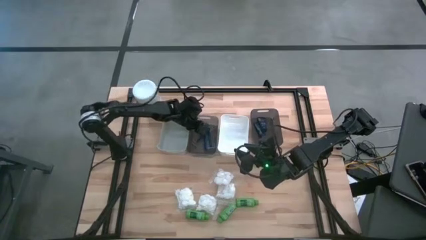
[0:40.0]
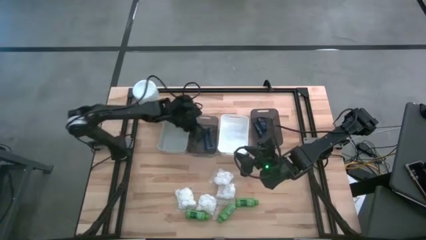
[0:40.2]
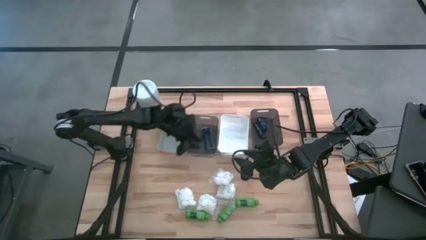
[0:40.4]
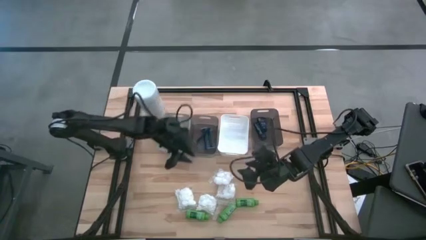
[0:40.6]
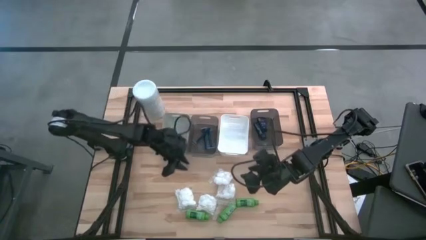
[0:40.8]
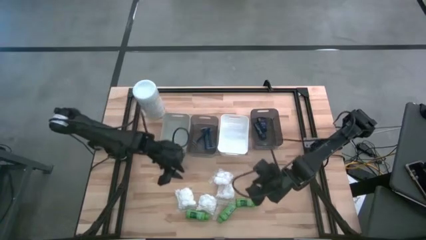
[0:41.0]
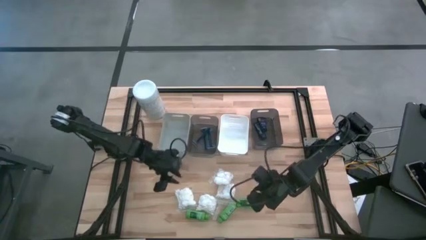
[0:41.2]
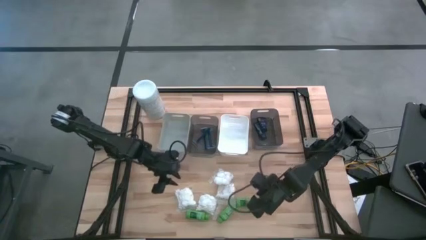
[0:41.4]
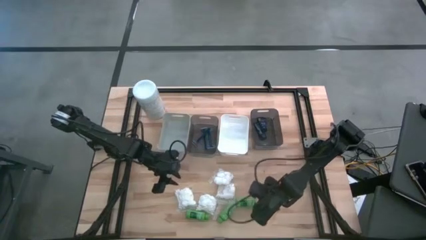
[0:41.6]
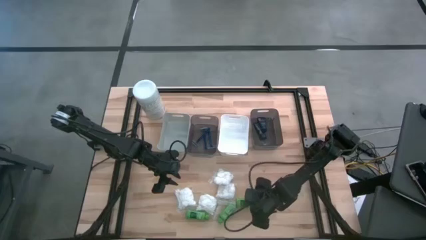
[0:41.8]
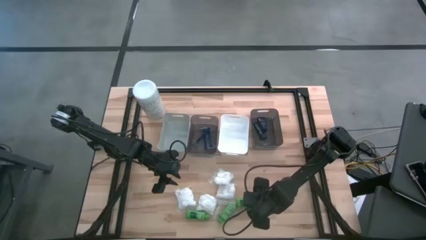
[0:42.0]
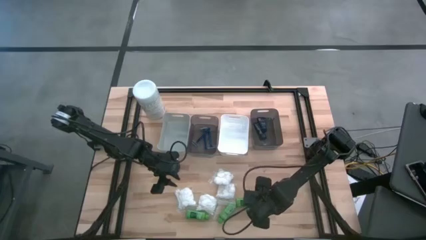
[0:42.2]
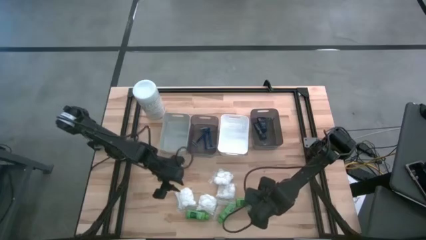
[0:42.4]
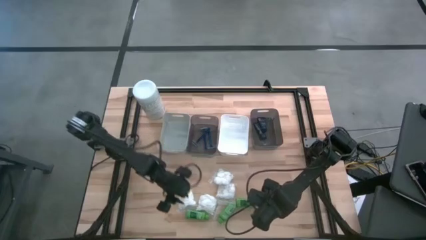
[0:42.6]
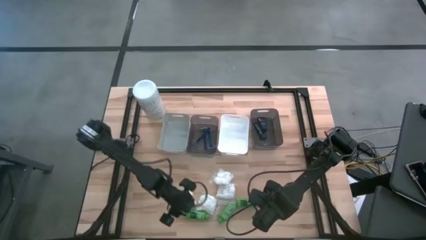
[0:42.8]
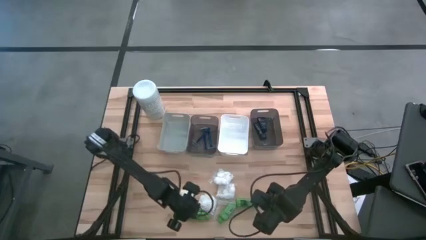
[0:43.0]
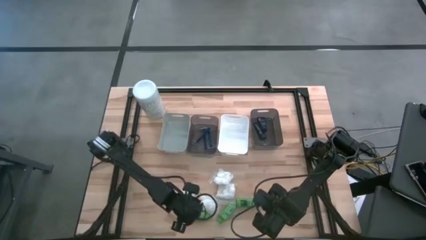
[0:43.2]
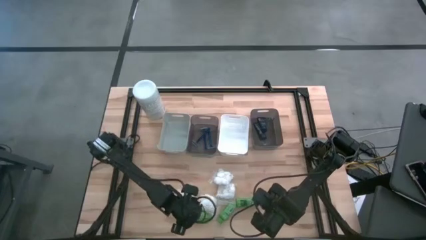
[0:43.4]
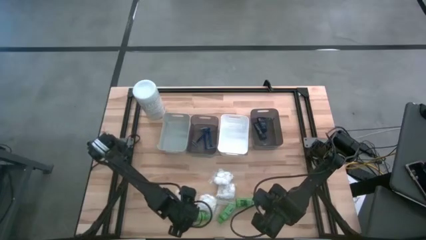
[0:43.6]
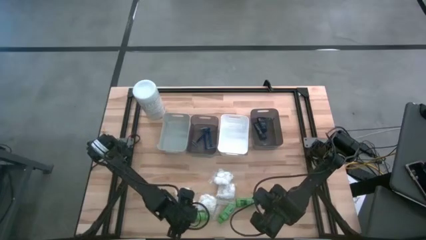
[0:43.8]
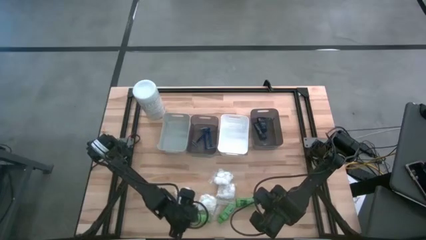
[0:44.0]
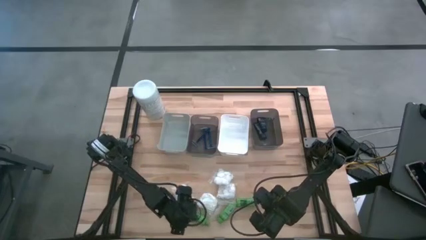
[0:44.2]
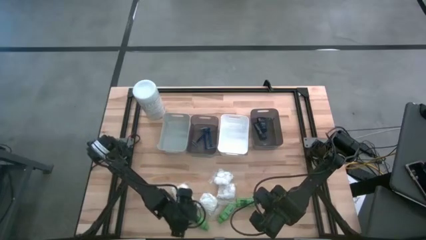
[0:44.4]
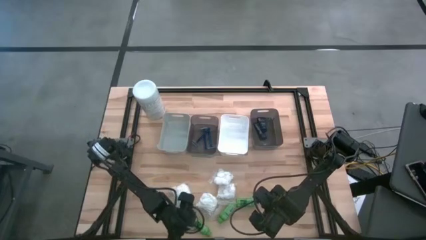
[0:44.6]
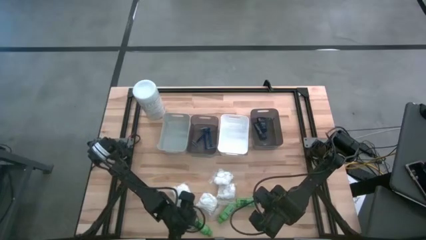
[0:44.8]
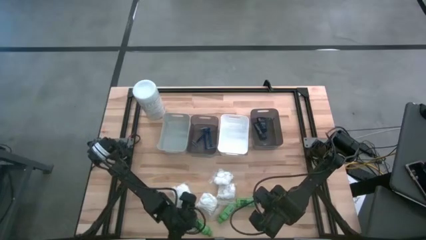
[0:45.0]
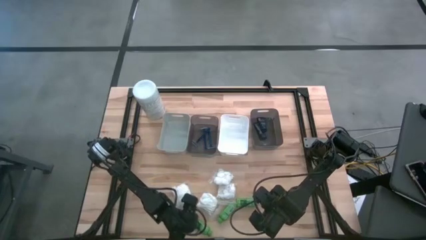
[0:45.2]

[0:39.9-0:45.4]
Task: Pick & Place Travel size toiletries
Put the green shampoo into the gray bin

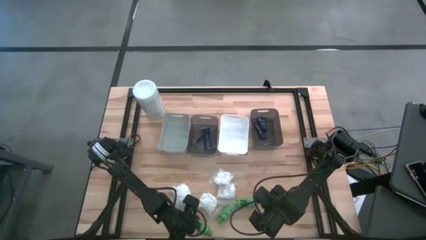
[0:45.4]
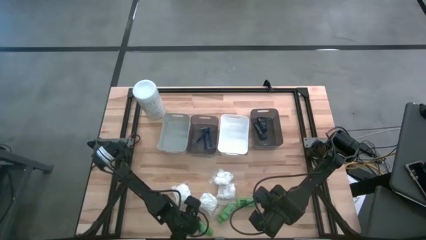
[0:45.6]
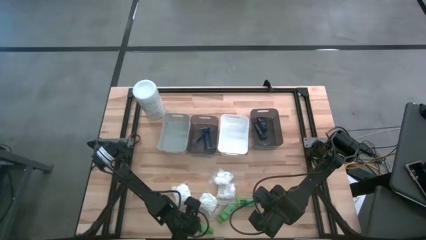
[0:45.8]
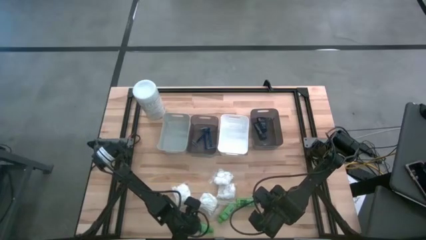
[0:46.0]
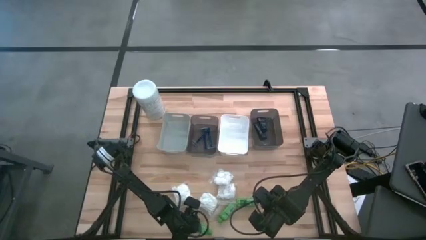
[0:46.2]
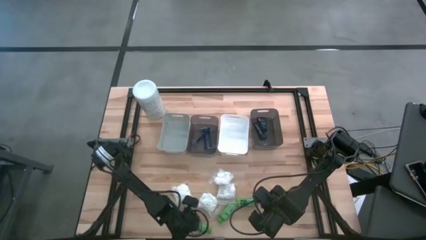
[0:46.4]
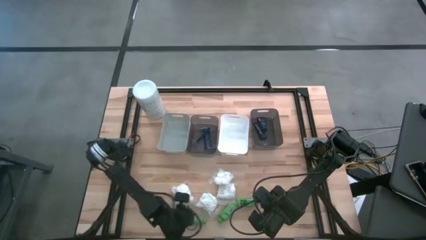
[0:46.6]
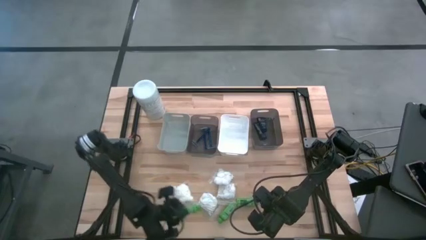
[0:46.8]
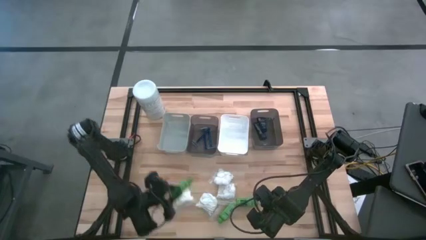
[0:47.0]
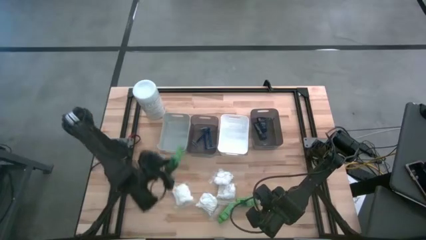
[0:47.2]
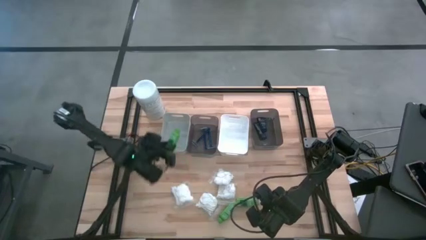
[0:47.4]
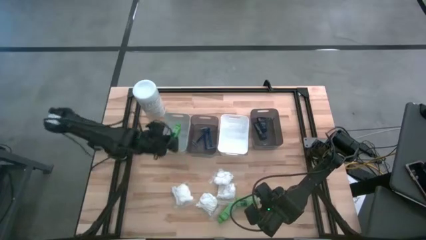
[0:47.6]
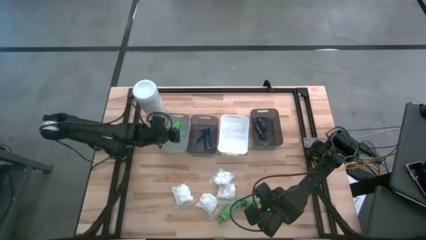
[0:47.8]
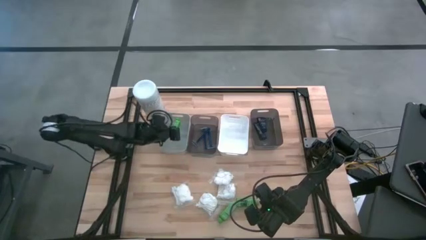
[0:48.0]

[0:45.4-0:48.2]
Put the green shampoo into the gray bin

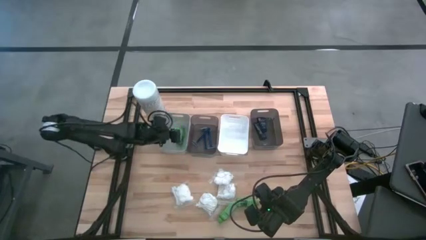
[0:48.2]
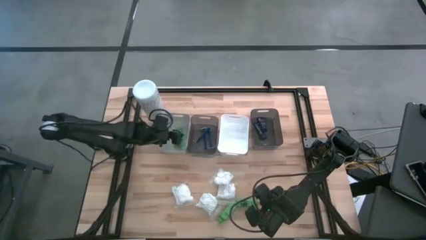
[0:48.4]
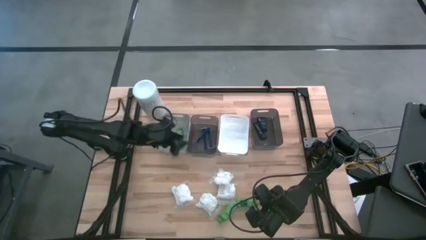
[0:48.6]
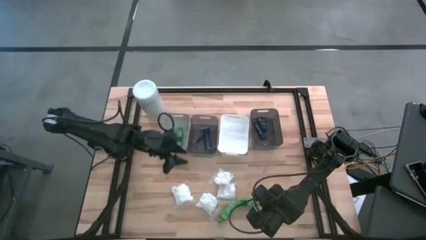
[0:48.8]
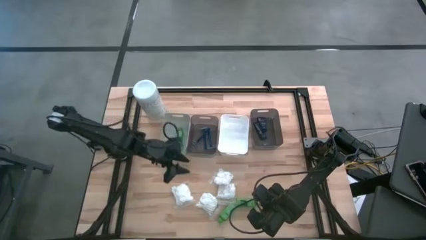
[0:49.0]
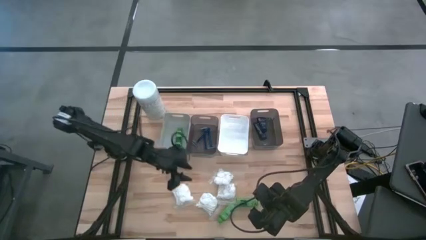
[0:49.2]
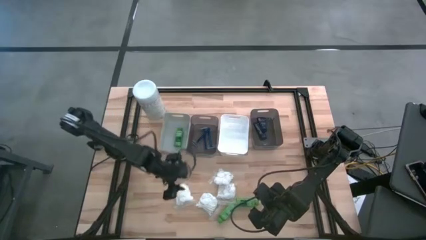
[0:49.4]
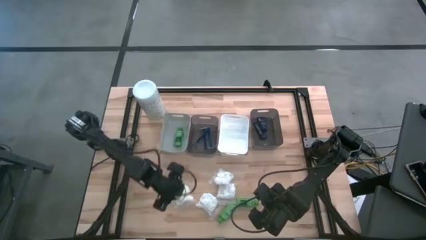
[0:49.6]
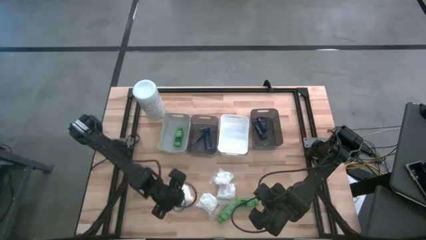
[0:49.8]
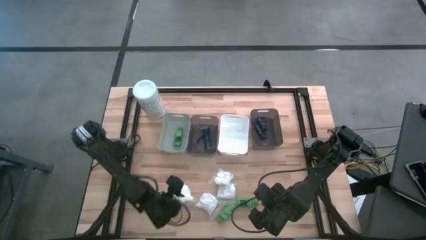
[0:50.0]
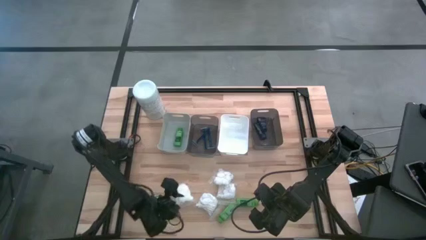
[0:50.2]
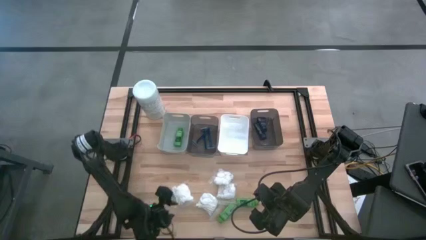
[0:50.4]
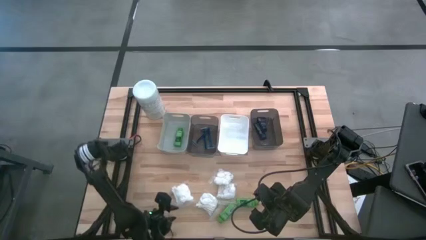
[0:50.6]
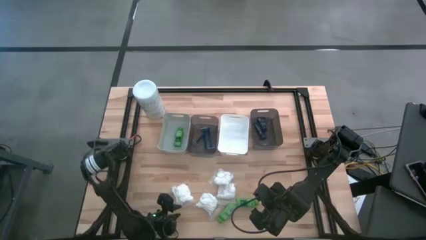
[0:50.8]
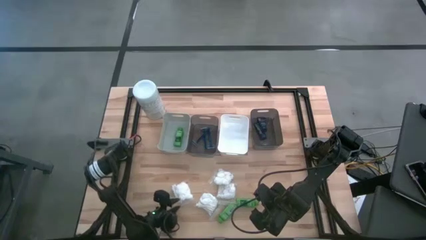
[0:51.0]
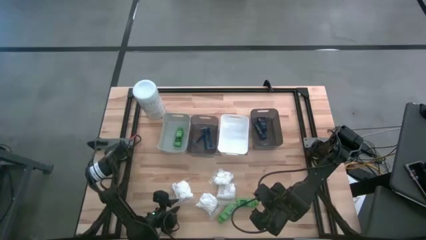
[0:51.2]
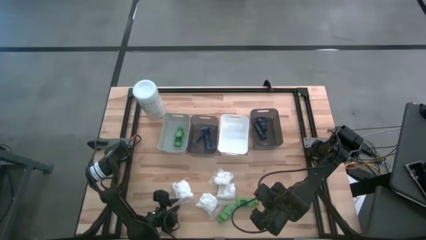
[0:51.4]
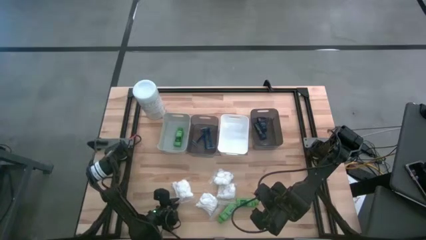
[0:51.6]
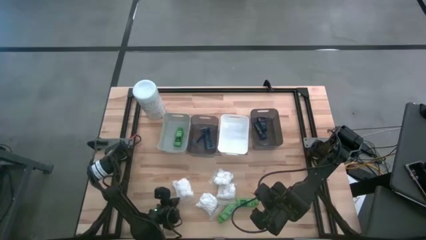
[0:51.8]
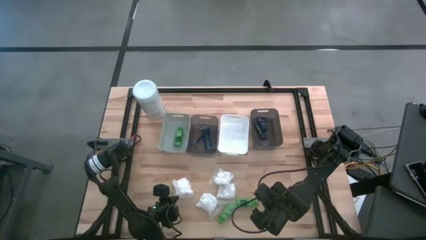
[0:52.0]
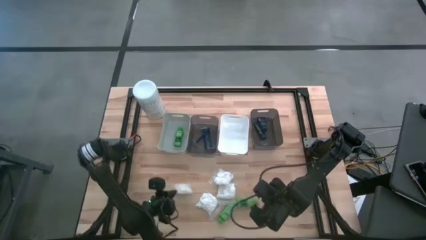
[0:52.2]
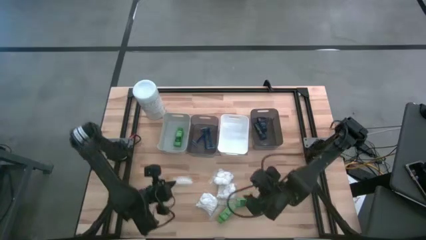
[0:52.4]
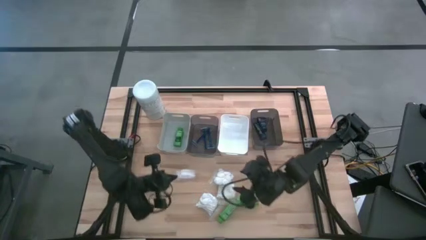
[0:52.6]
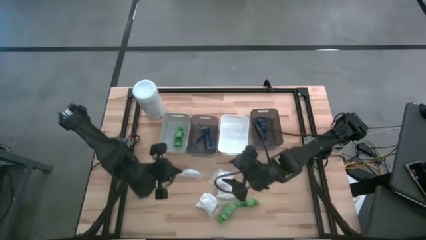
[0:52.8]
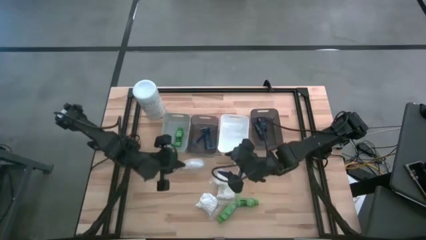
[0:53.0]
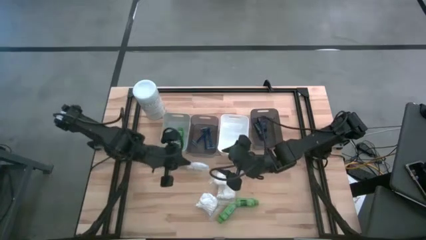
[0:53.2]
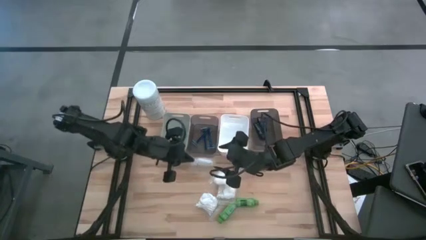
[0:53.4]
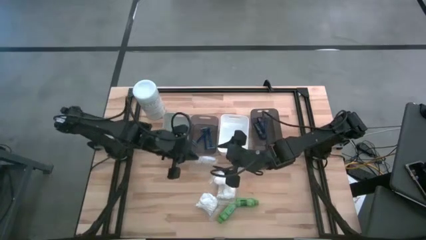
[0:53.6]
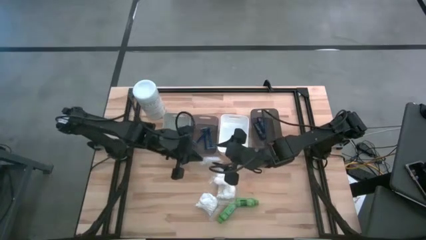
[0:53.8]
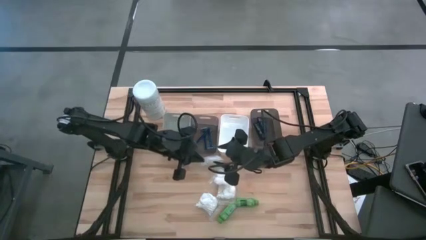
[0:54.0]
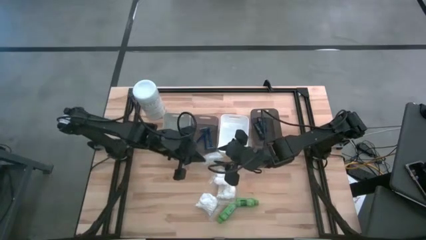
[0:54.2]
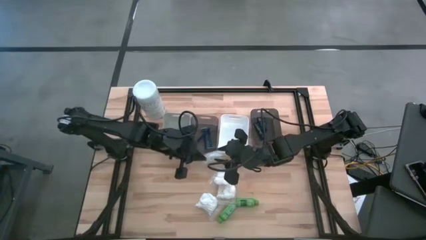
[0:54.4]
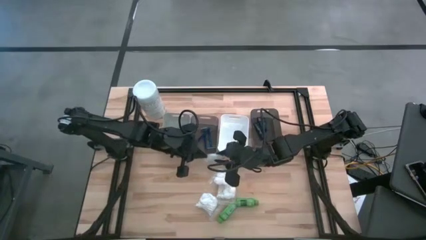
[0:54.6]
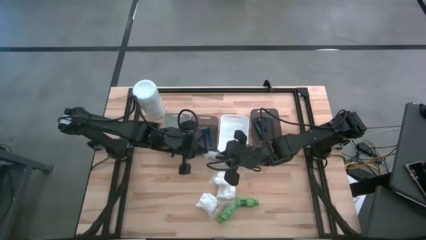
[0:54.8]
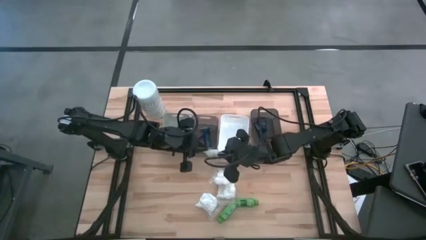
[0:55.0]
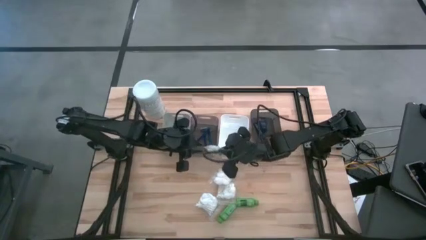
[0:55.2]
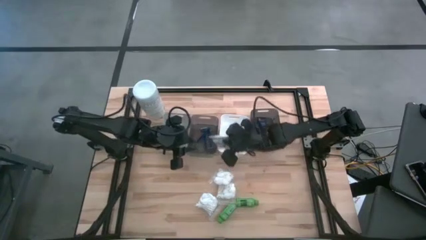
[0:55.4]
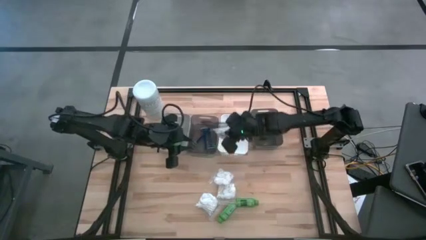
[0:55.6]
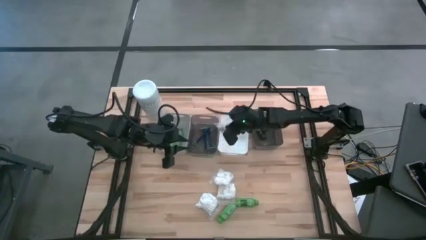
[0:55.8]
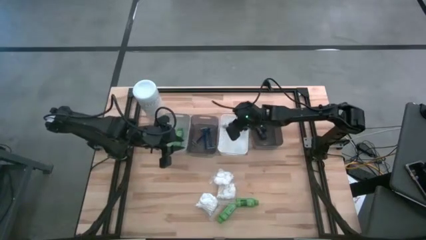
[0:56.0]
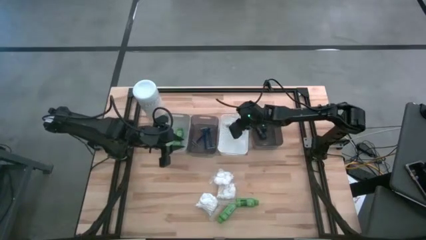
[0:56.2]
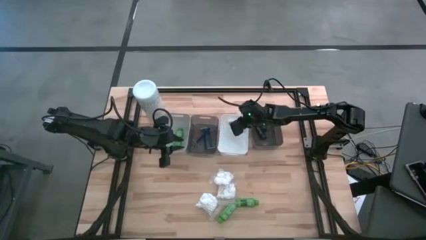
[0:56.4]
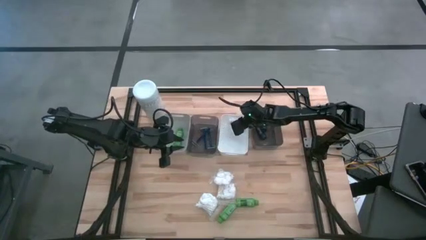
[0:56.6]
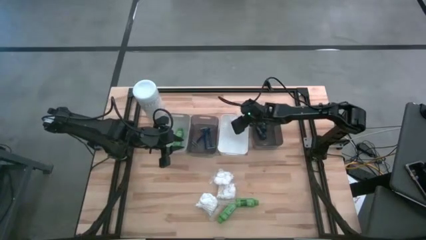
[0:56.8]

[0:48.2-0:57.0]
Put the white cotton pack into the white bin
